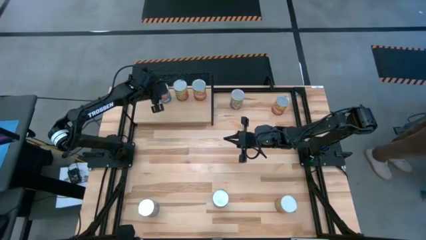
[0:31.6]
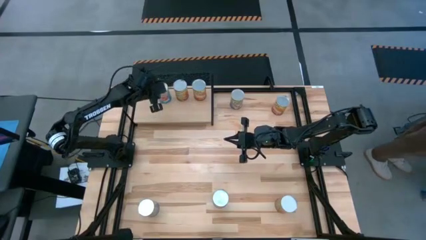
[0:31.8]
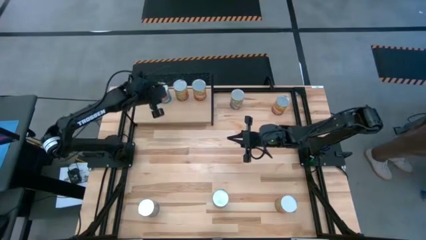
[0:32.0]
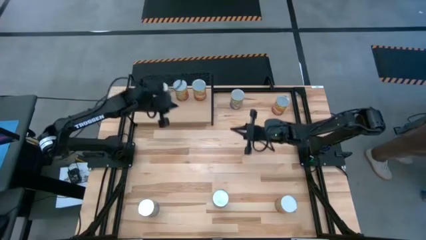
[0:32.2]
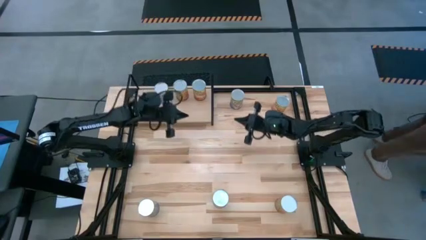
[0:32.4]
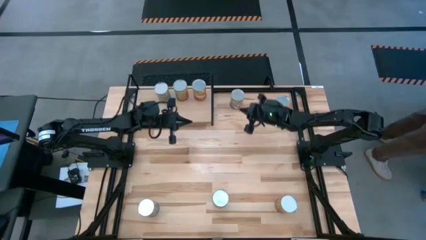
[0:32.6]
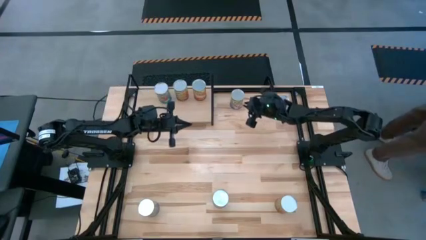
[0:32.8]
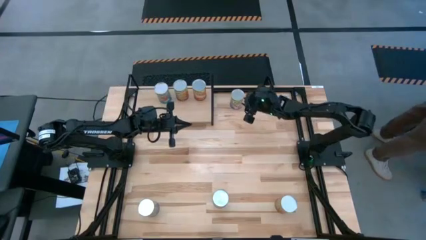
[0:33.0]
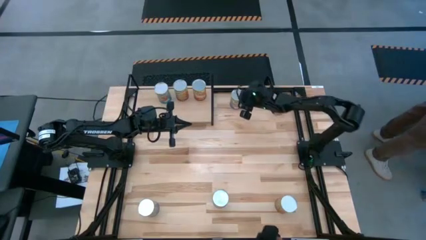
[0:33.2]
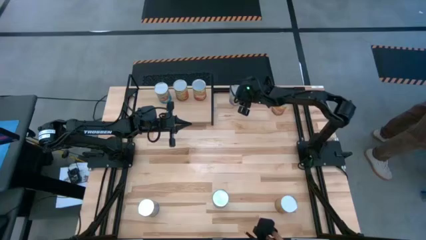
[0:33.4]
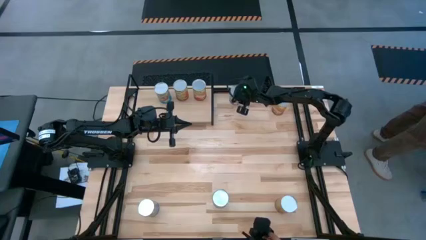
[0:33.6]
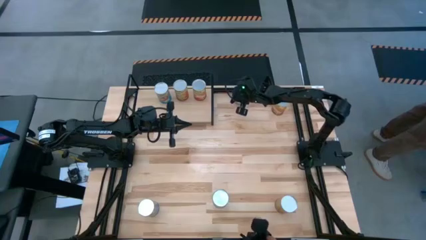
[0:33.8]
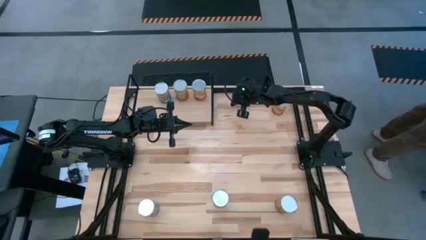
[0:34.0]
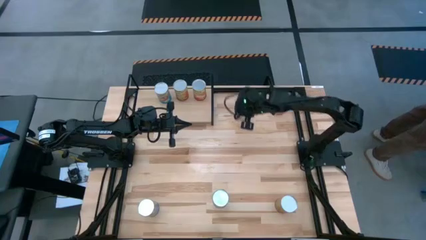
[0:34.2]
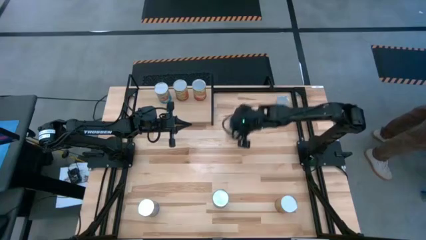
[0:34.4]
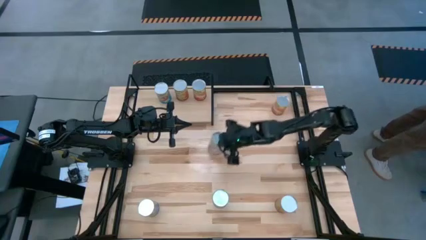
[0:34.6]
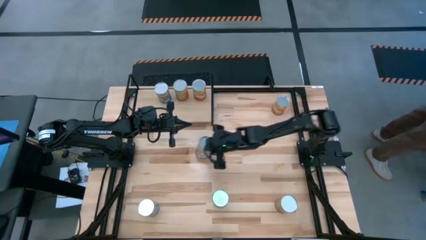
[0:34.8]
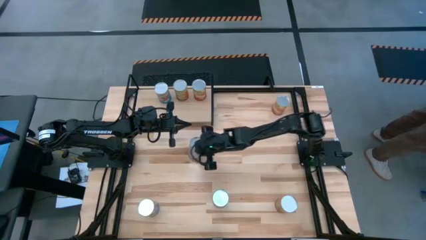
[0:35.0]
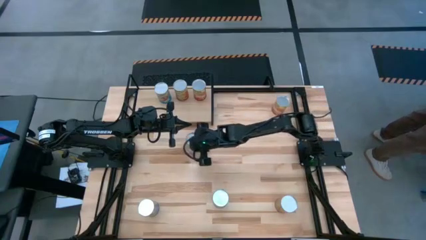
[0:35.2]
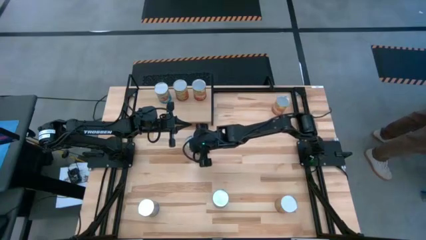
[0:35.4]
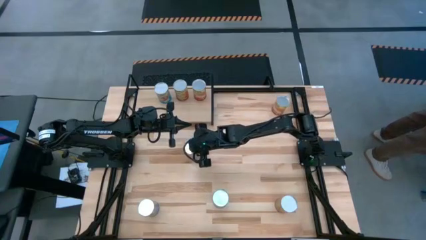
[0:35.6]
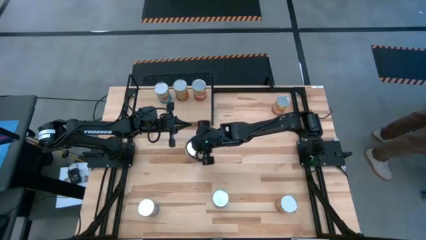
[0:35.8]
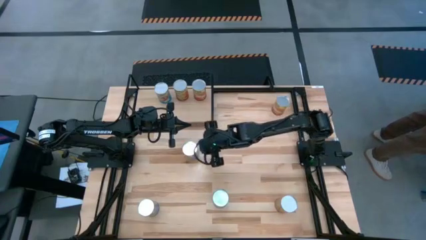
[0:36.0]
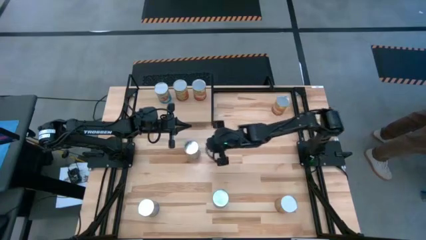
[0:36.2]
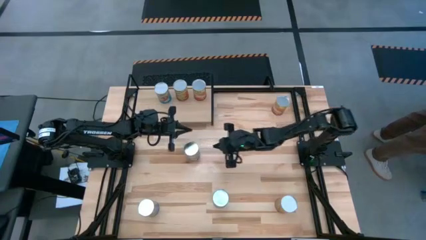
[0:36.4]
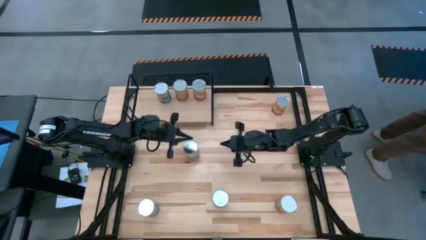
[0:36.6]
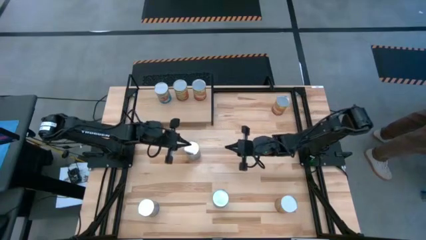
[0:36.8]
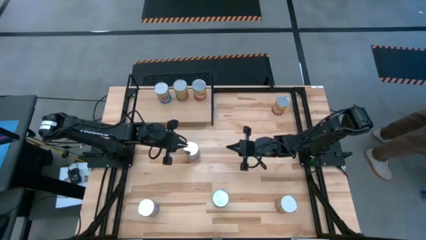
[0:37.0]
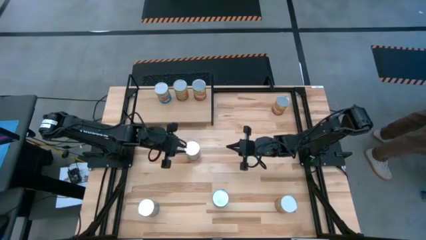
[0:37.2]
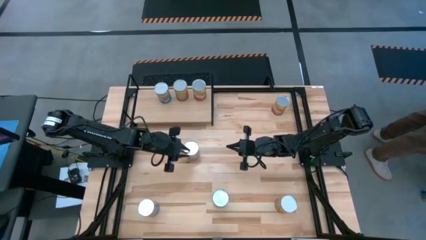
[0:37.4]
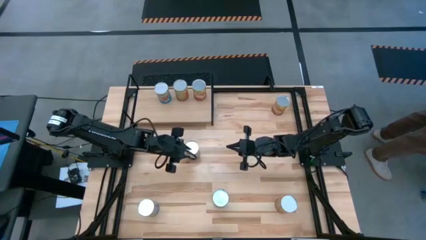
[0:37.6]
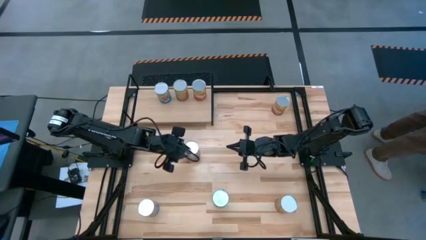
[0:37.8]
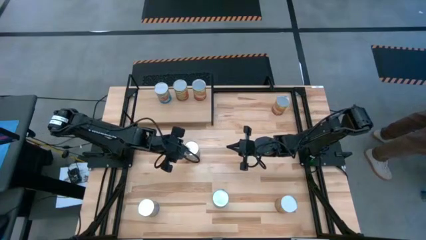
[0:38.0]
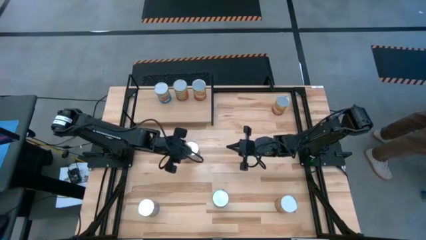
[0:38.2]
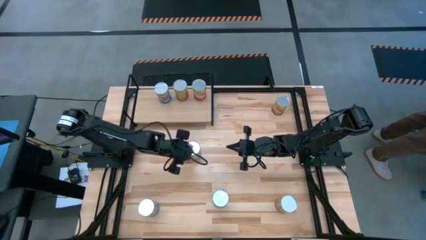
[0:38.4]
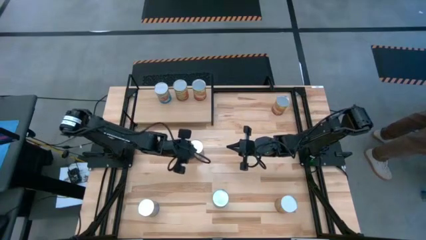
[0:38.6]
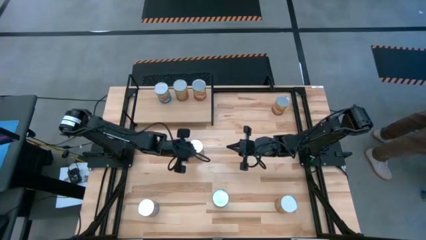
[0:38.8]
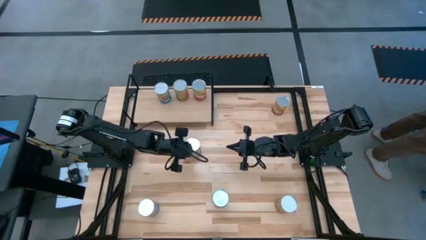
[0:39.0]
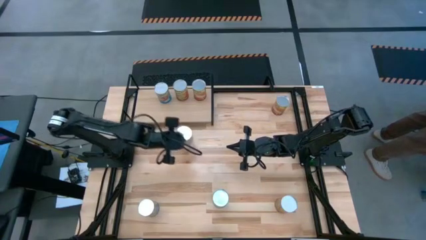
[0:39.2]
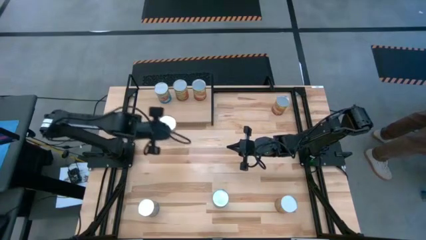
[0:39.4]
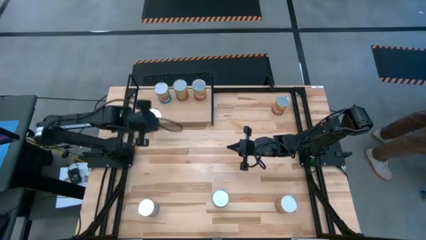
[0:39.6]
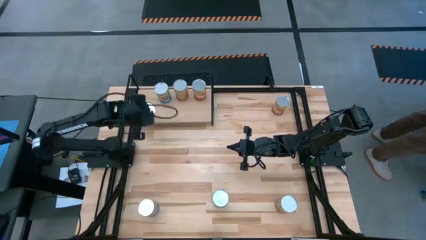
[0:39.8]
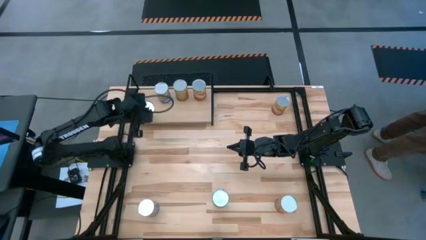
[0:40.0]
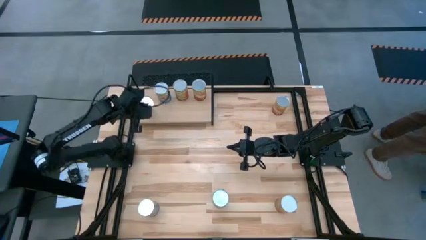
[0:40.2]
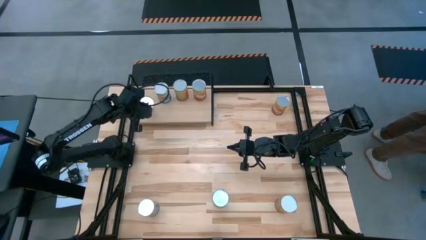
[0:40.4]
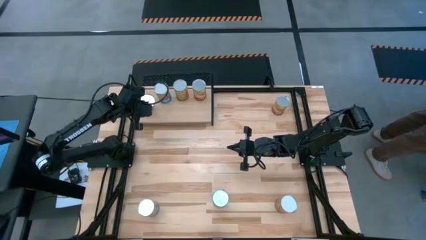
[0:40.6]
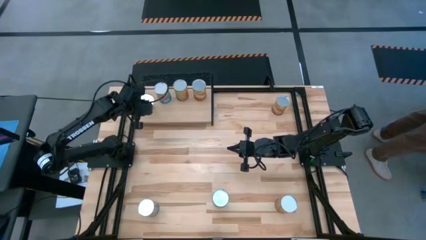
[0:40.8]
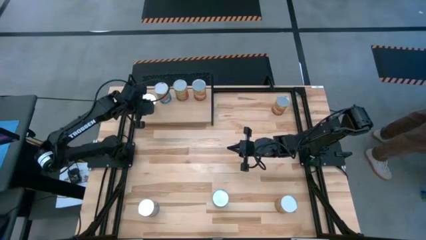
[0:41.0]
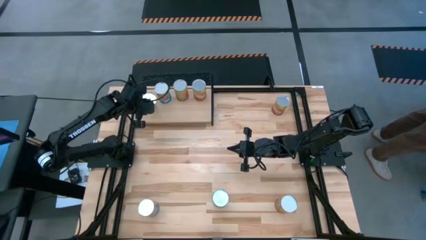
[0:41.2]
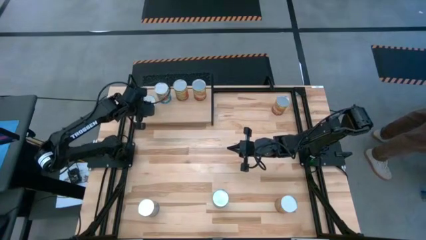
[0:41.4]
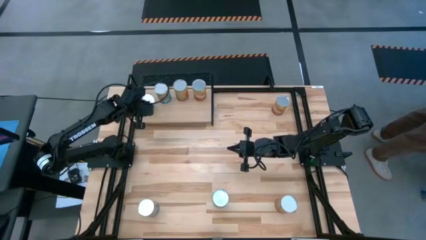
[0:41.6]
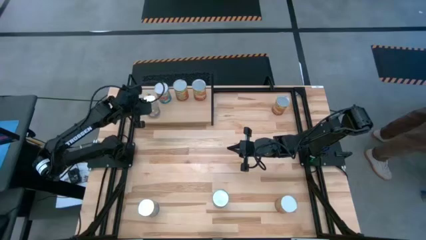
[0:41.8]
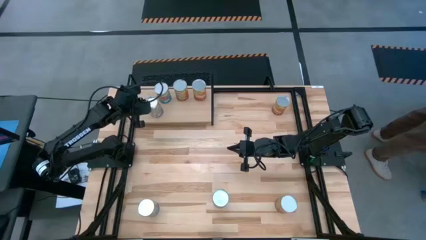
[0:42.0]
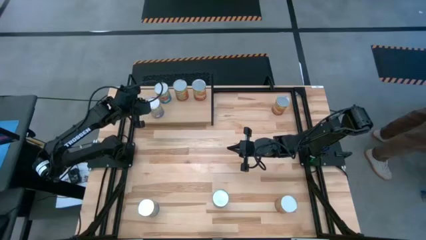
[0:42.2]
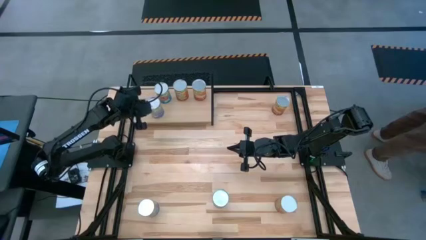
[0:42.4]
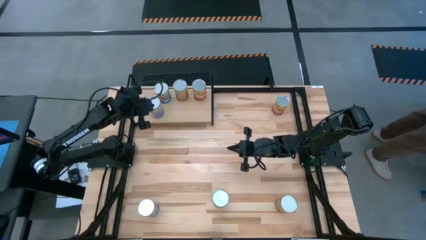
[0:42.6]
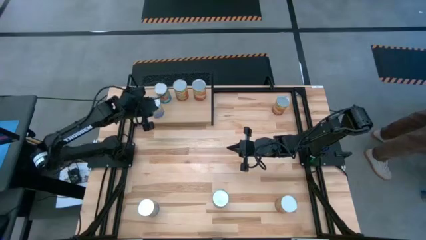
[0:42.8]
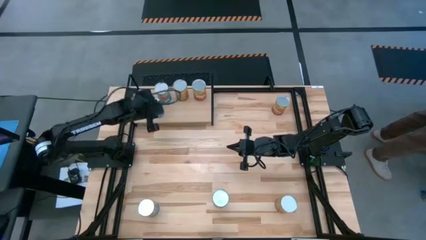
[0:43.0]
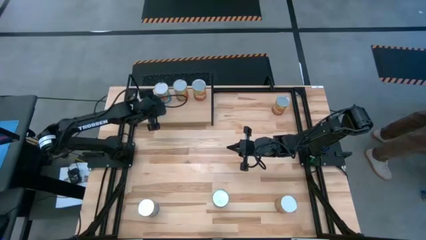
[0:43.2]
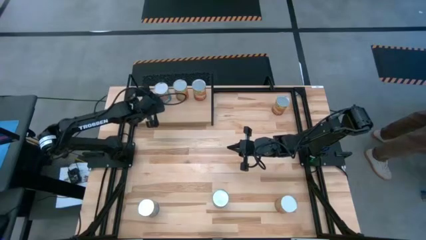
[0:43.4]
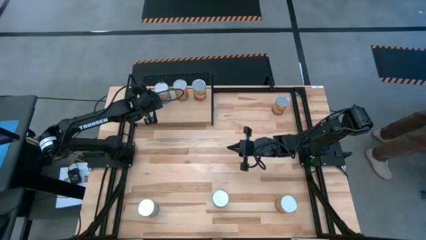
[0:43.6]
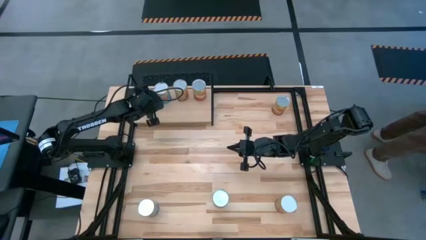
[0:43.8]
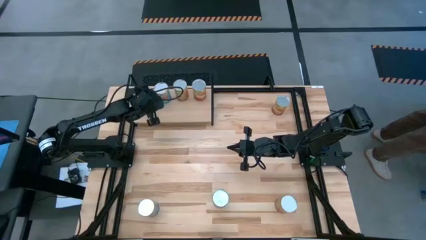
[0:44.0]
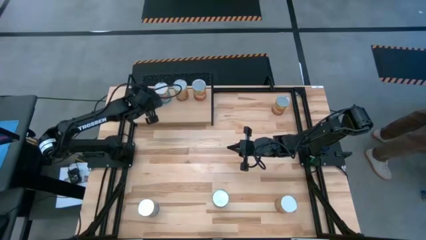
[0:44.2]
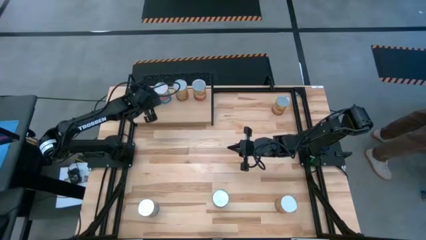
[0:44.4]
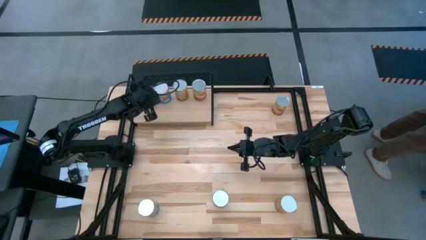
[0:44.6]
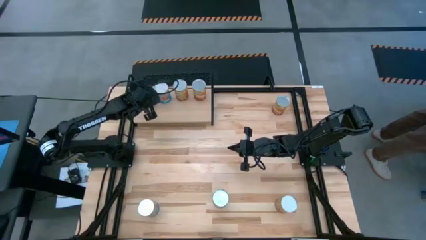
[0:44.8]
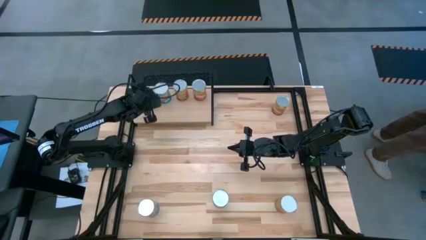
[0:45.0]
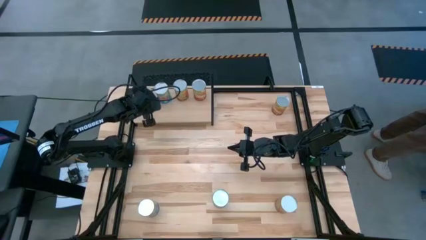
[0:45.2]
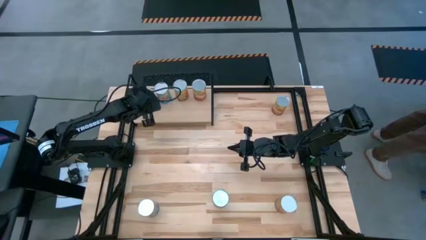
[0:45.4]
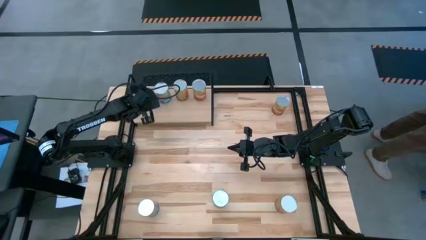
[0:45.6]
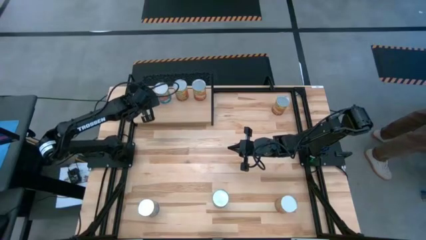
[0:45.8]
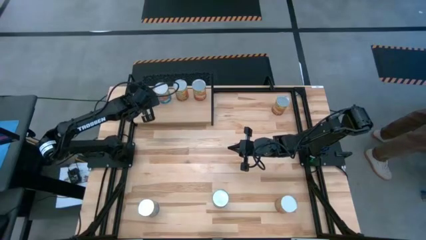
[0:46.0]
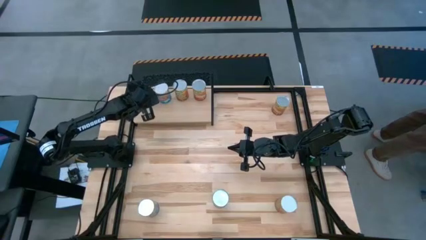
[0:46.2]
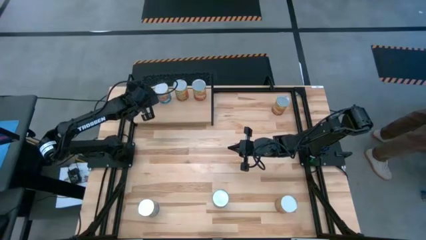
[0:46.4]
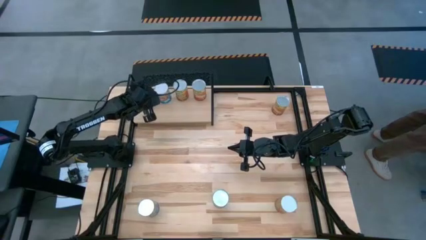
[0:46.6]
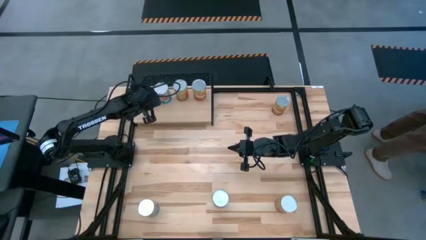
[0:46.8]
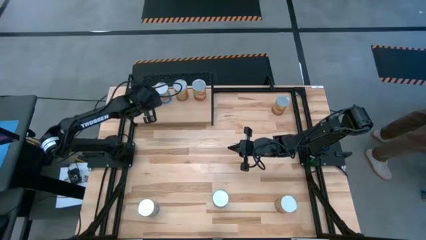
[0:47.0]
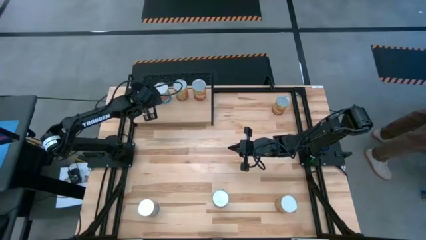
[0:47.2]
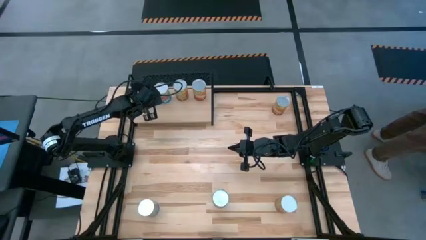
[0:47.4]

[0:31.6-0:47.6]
Task: Pick and place cans onto a shelf
Put the top middle canned peaches on the shelf

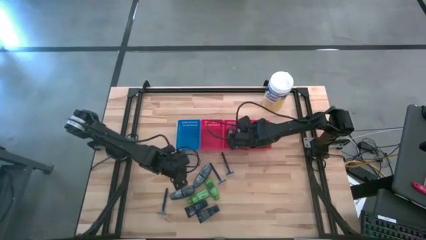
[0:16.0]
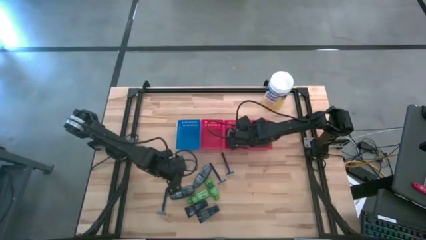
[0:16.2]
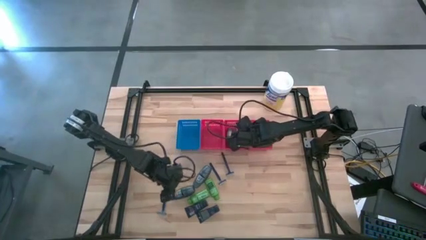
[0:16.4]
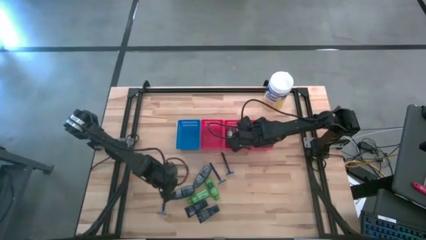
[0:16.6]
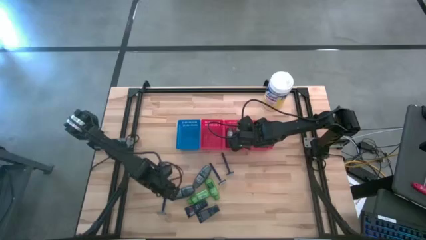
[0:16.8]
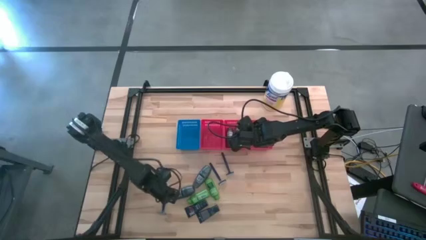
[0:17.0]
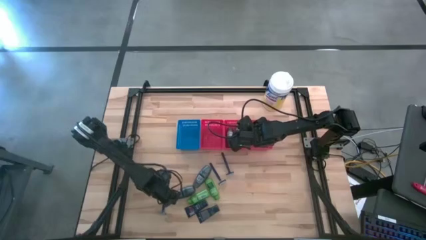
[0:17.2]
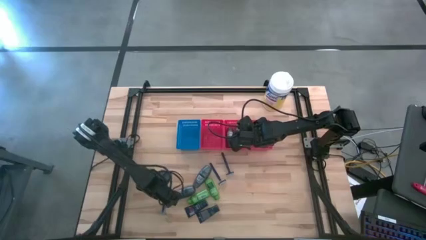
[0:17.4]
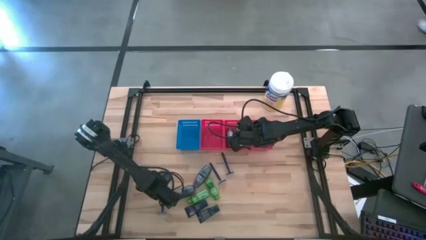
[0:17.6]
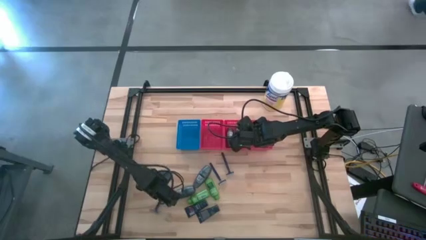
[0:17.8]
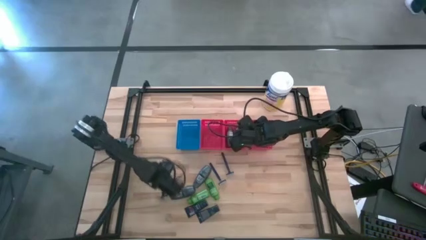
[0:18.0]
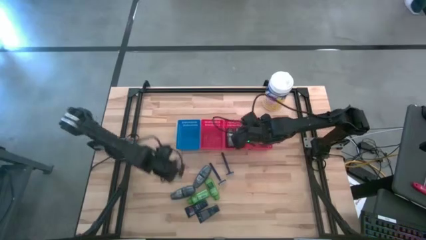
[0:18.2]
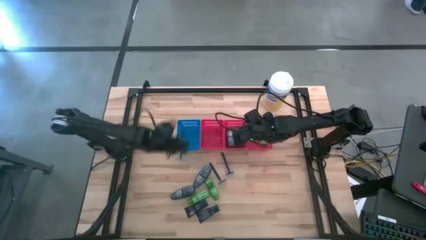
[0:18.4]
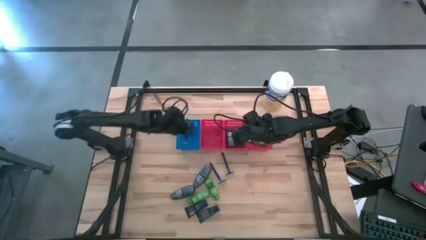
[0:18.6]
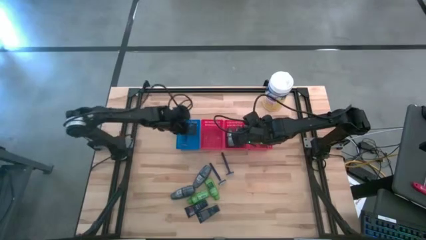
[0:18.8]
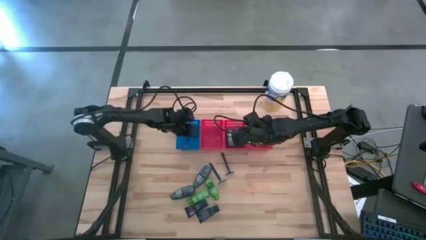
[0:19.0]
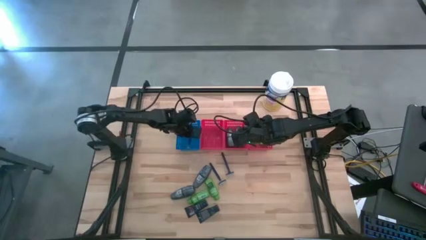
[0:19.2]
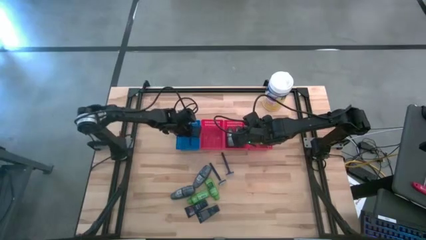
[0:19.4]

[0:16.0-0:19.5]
Task: Pick & Place Travel size toiletries
Put the blue razor into the blue bin
